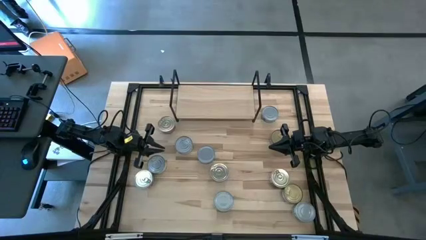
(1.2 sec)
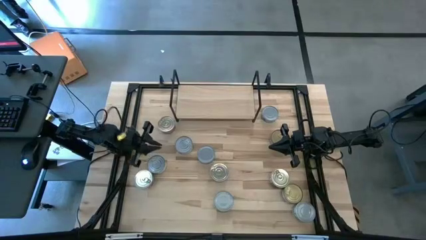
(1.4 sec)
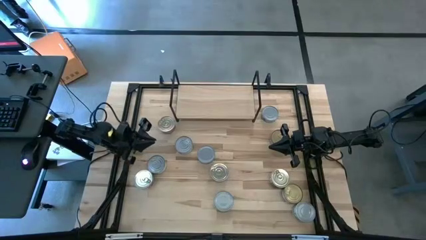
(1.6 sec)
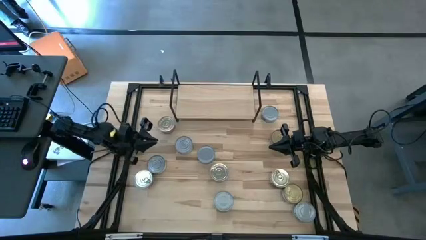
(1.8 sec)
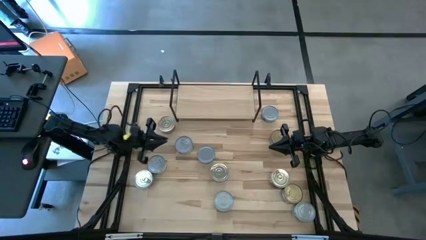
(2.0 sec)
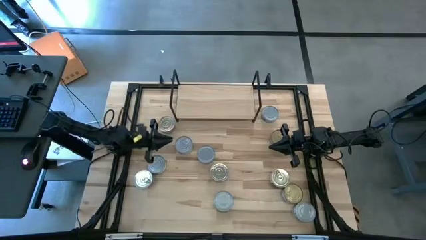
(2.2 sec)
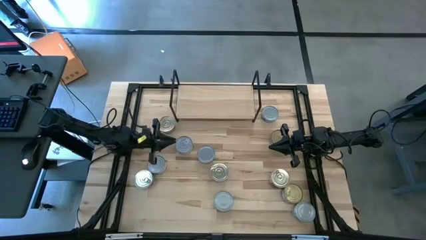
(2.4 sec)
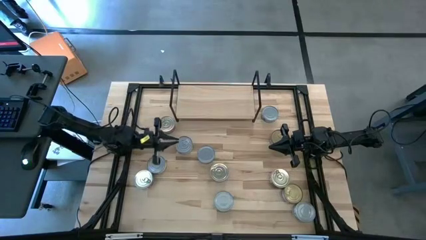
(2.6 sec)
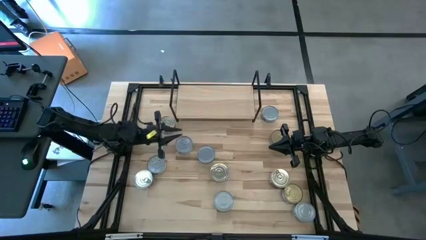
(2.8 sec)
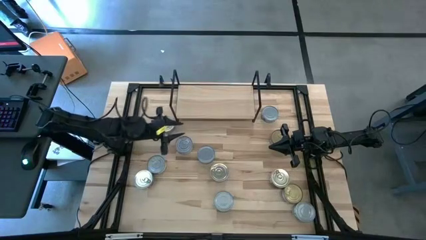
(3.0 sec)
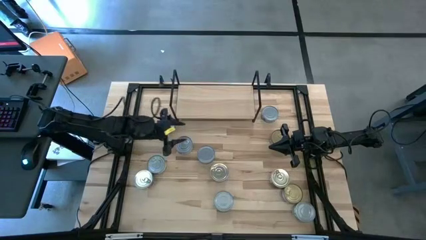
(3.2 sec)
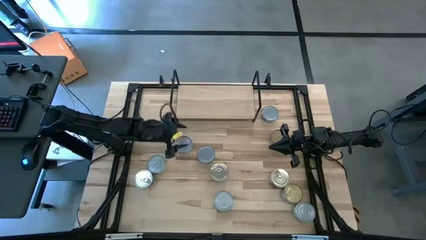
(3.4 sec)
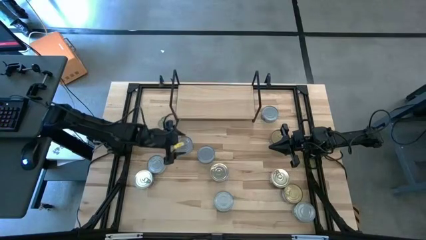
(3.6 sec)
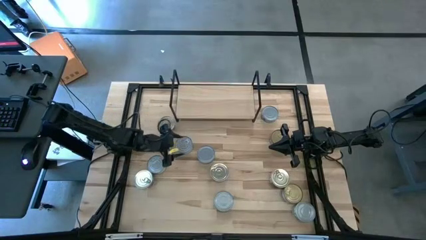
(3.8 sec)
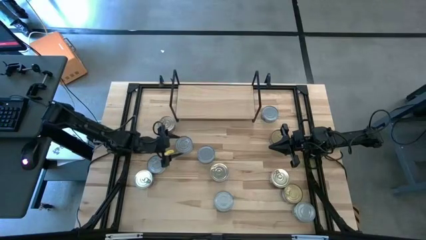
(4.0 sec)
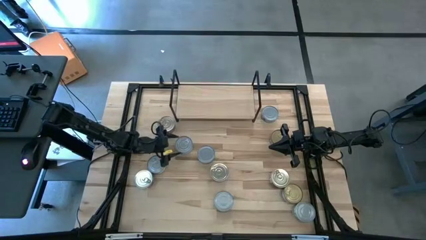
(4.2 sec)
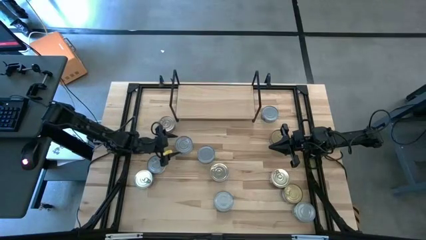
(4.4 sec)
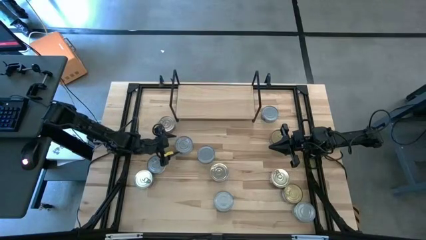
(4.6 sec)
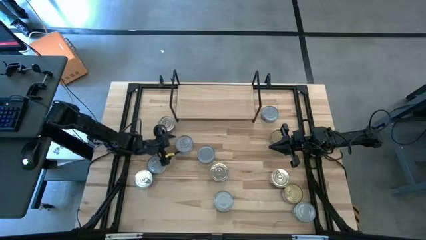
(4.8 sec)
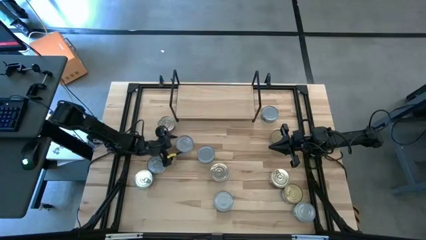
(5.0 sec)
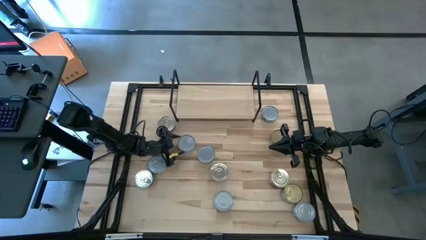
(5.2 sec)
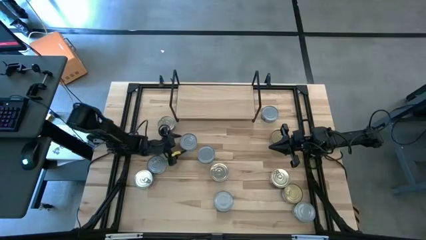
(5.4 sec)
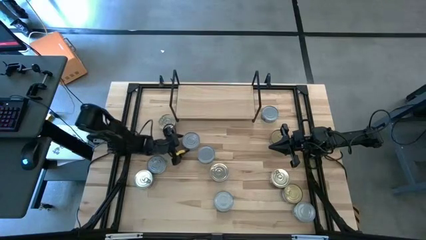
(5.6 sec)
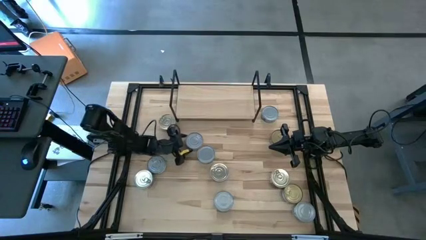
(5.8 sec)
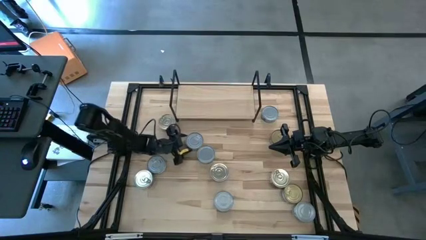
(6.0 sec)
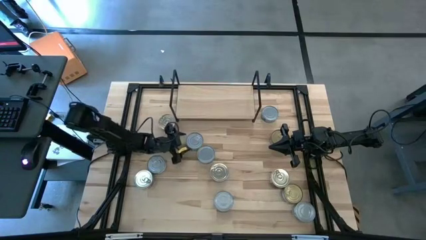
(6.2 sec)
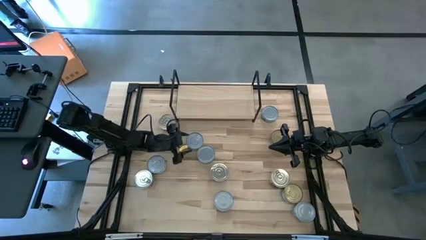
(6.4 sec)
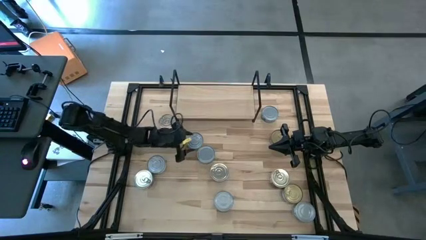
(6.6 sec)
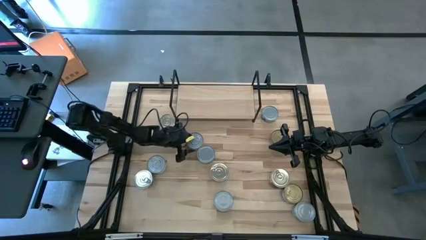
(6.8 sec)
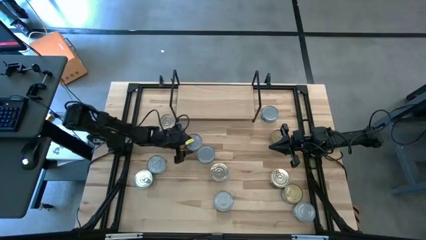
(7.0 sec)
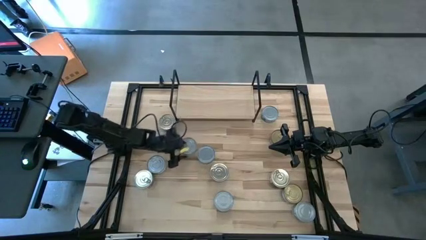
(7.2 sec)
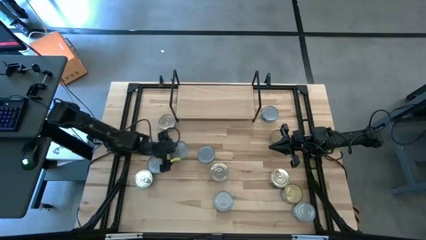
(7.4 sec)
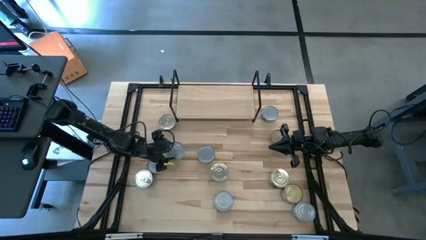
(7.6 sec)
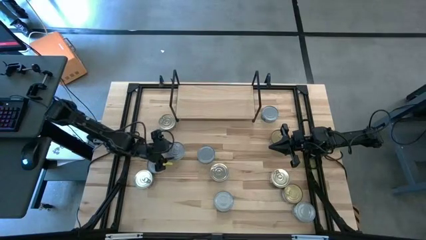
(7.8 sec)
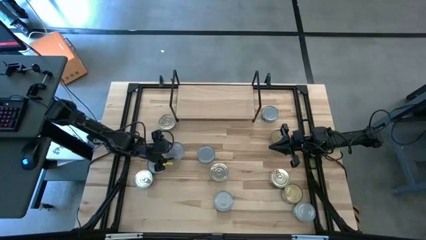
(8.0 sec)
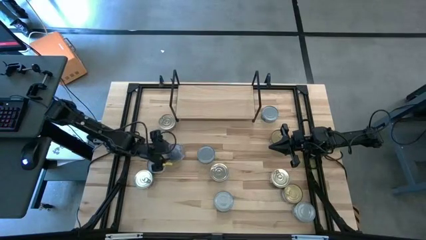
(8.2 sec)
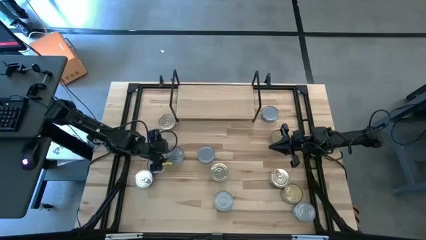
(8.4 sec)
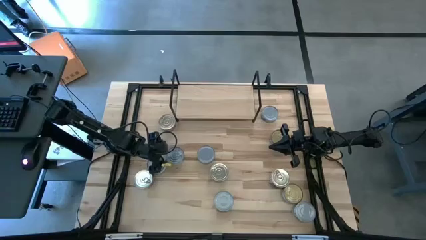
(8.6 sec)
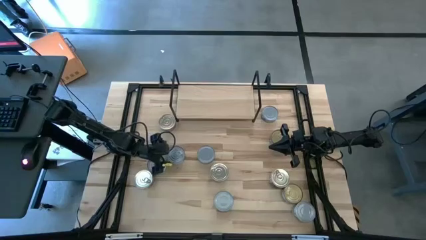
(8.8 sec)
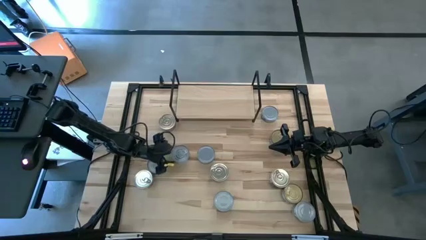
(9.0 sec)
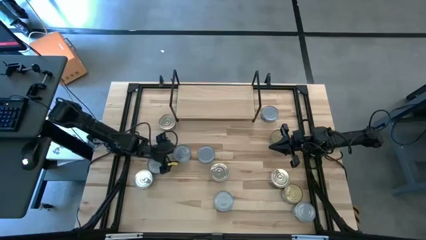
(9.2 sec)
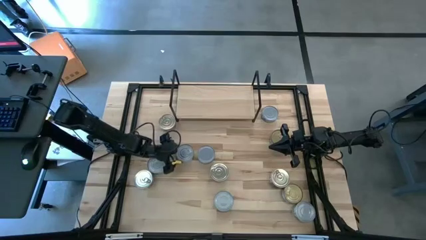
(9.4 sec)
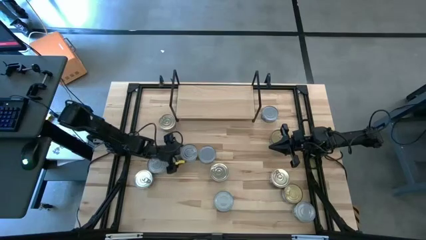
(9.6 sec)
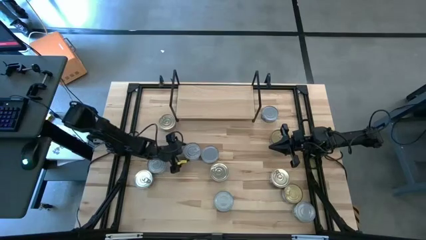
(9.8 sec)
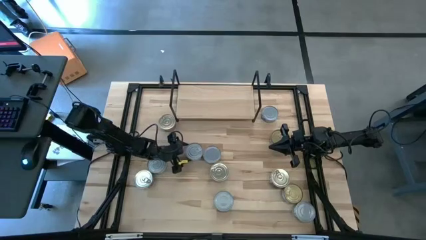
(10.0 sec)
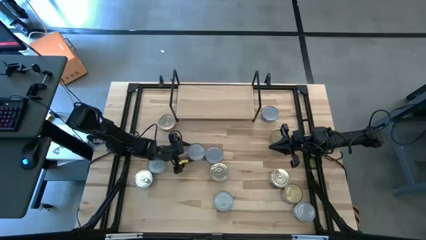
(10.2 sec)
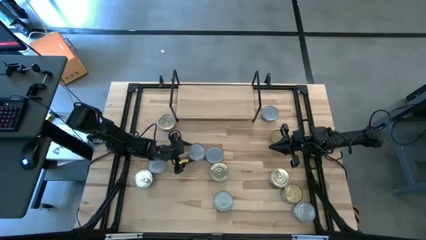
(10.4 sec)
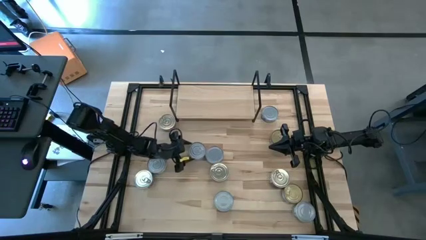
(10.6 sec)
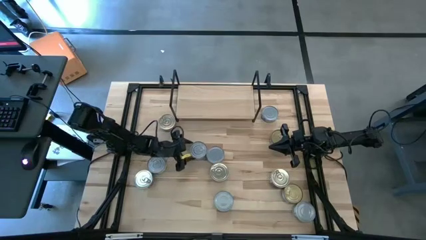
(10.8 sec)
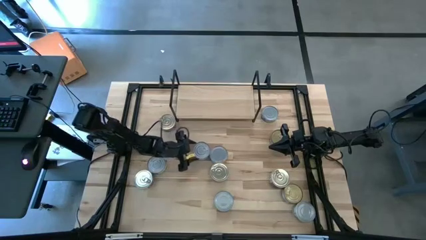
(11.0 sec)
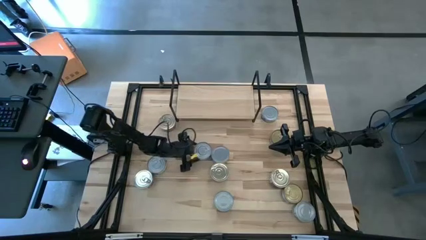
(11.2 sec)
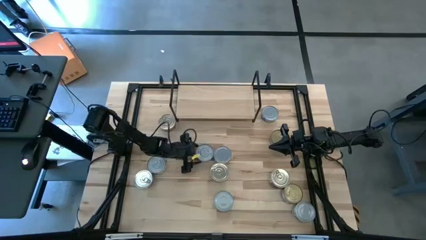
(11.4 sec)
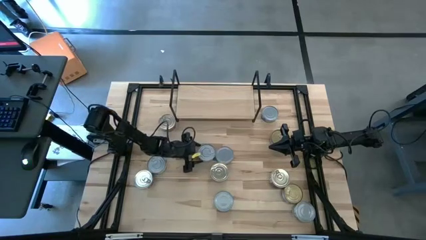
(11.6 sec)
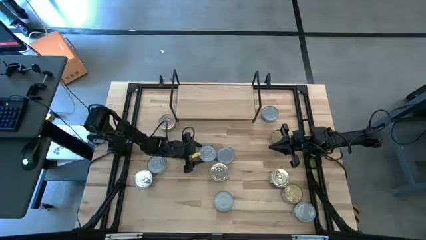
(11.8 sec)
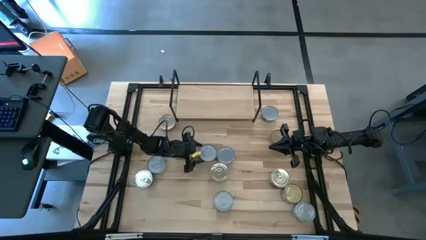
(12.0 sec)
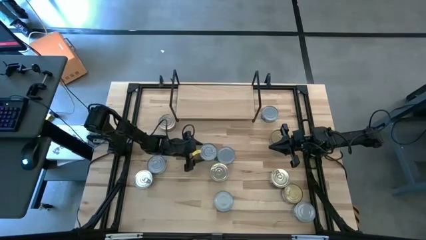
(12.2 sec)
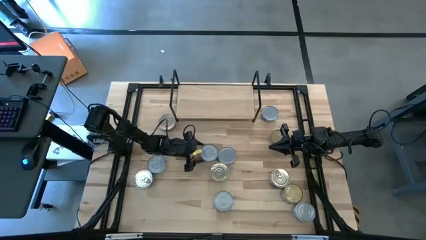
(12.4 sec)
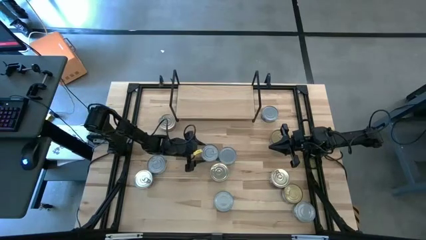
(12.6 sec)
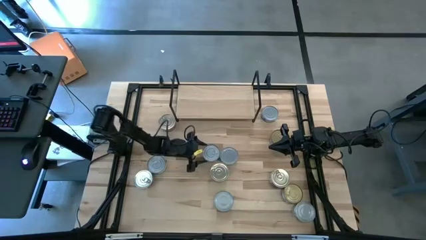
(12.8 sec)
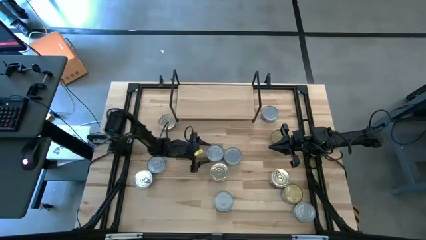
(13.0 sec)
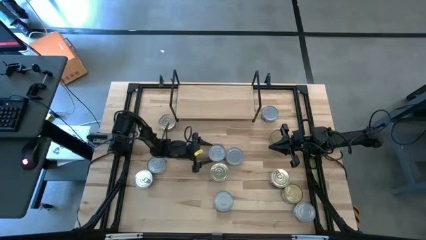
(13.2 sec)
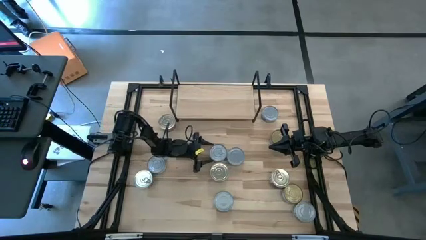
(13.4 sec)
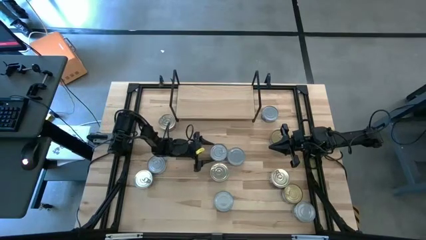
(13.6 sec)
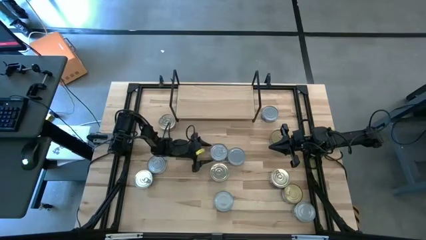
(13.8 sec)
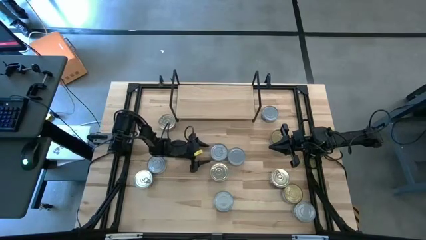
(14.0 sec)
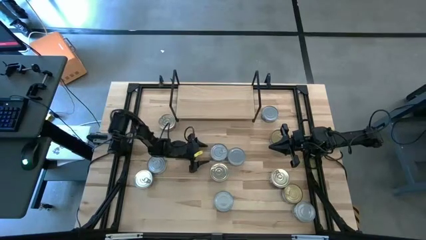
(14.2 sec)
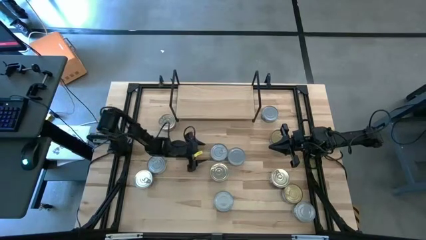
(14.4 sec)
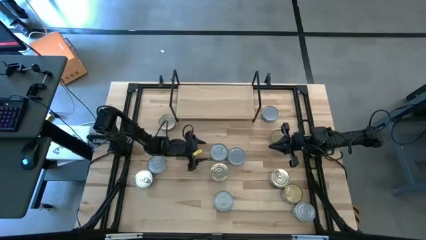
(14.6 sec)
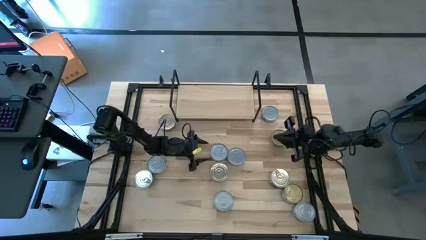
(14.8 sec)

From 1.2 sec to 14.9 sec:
Task: Stack canned seafood by type on shelf
Put the top right green and blue tuna can on the shelf
